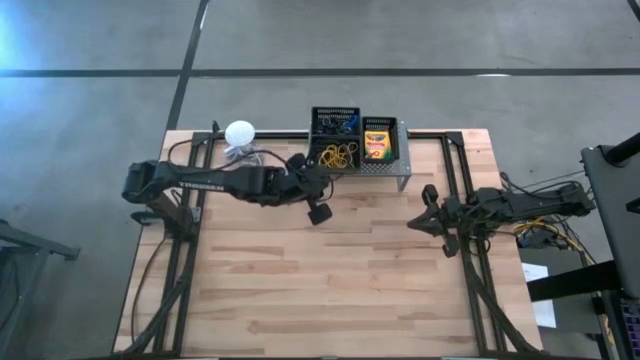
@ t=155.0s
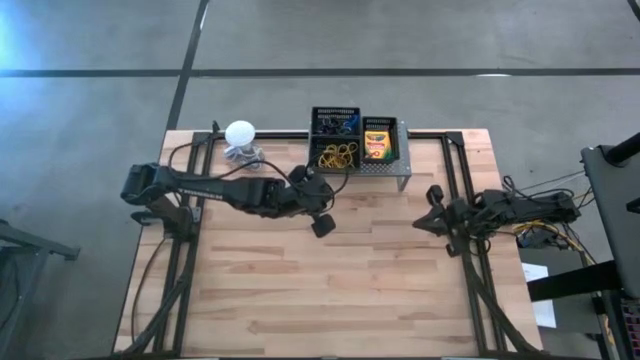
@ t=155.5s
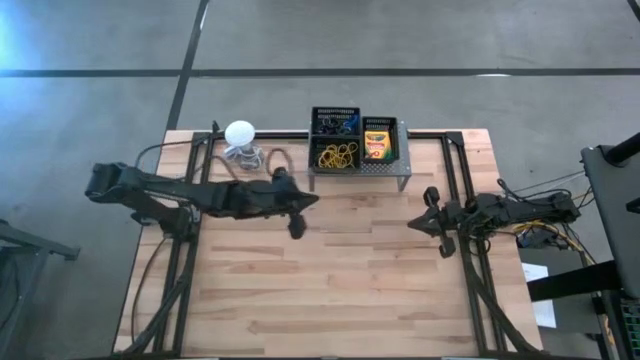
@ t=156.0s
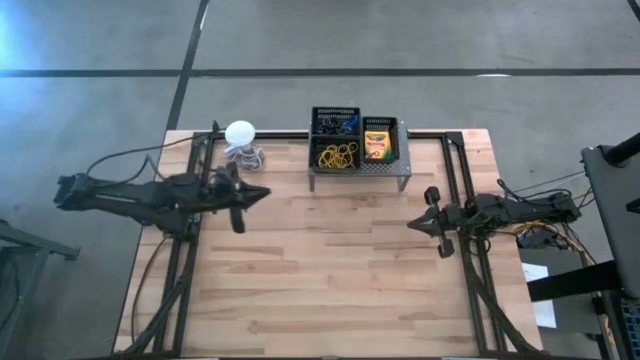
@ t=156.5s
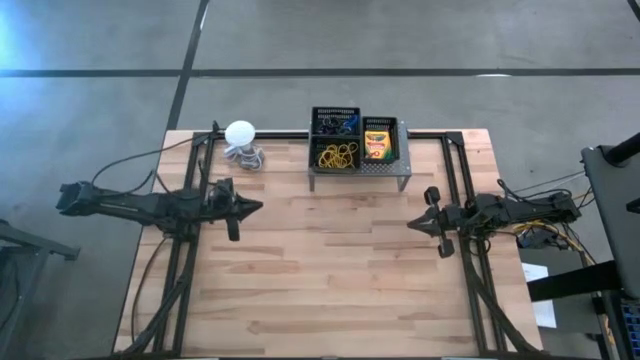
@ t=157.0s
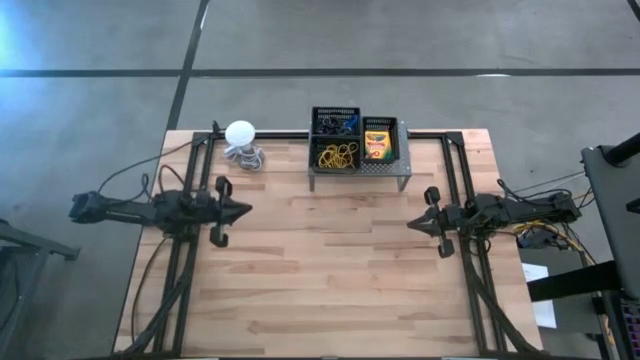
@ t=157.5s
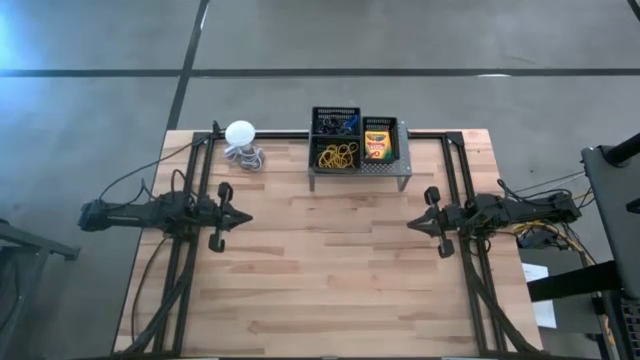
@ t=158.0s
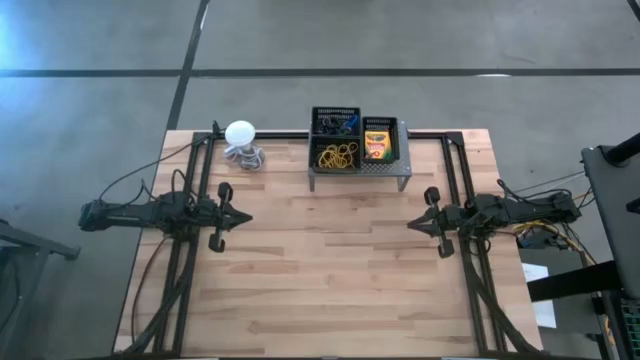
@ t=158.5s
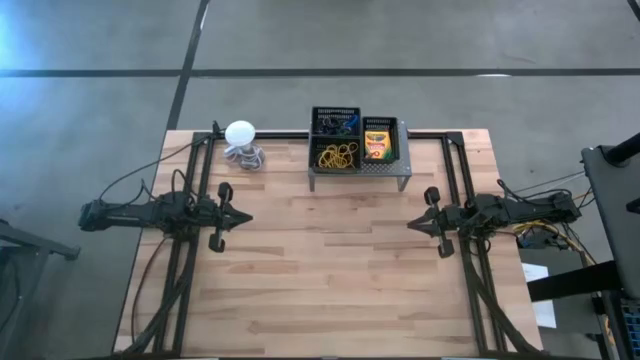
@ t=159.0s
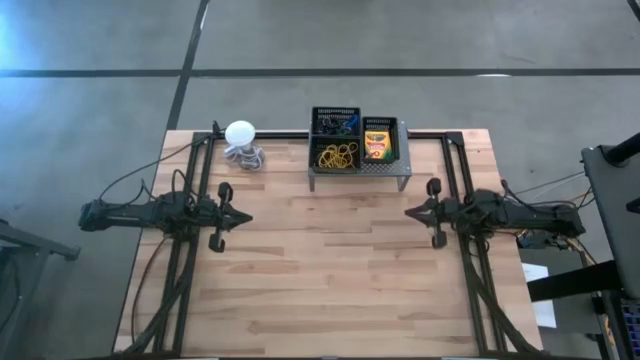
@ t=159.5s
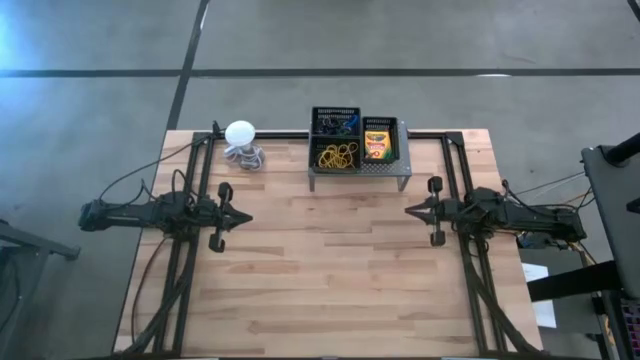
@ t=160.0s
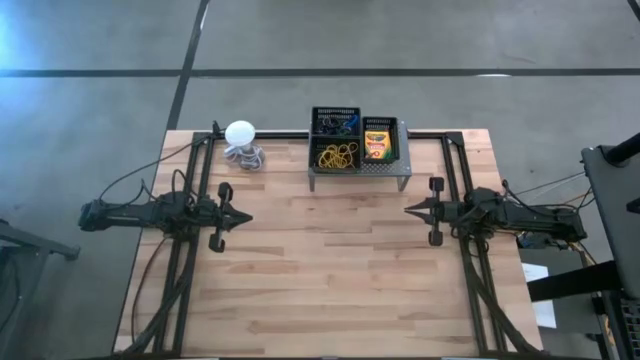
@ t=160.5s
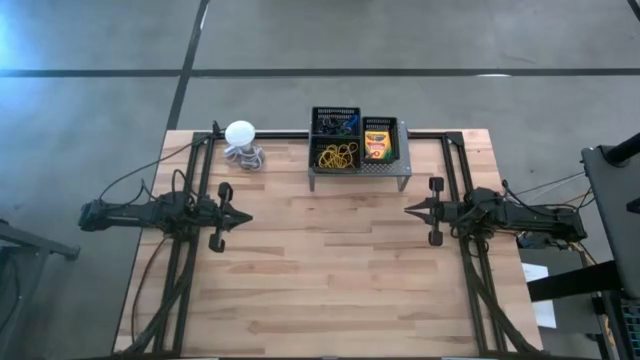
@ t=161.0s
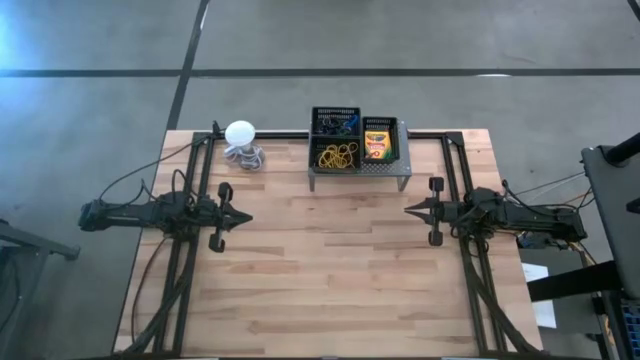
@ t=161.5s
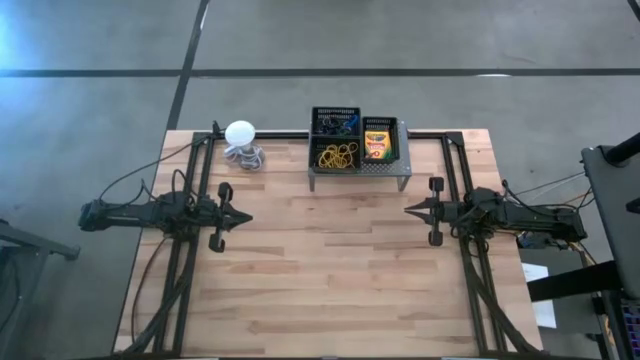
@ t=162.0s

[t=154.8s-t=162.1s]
Task: Pick & Place Office Desk Supplies
Return to Home Position

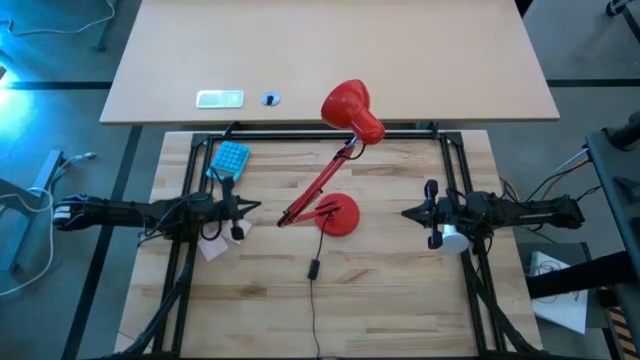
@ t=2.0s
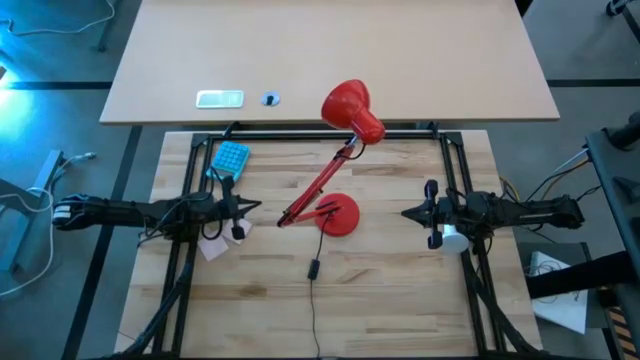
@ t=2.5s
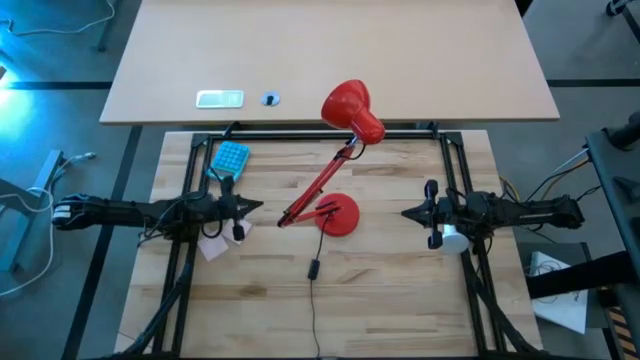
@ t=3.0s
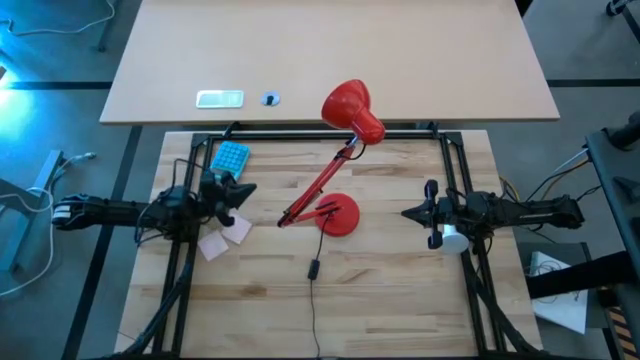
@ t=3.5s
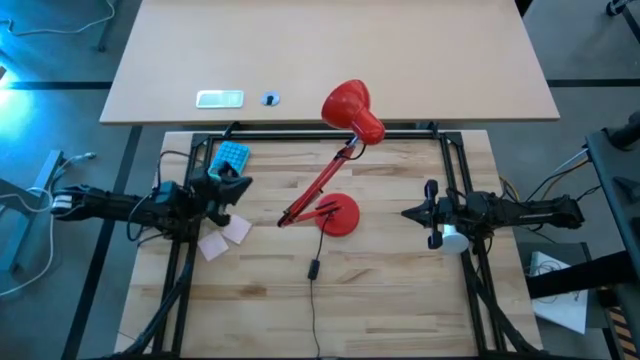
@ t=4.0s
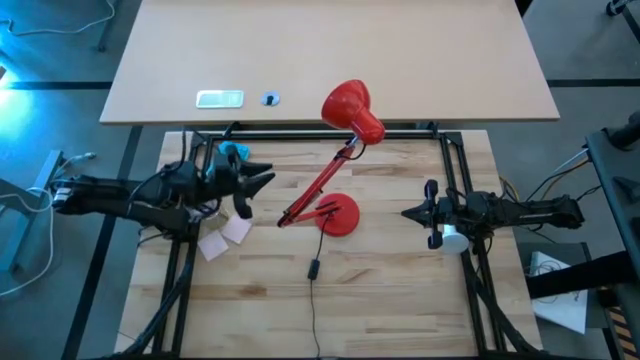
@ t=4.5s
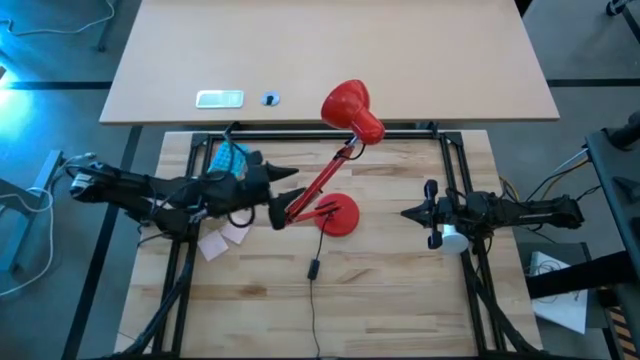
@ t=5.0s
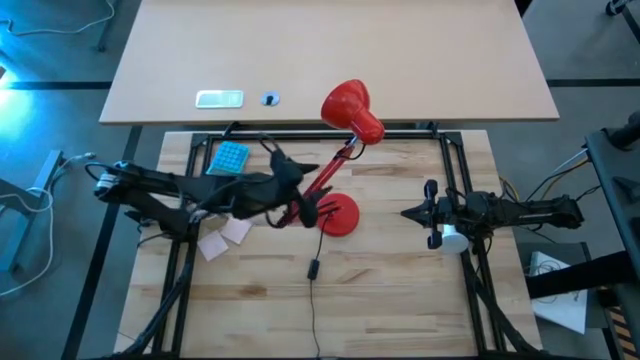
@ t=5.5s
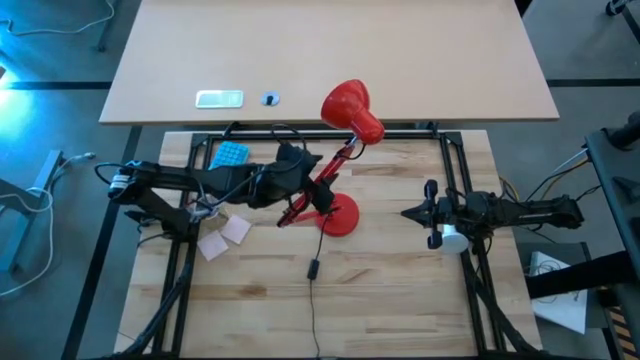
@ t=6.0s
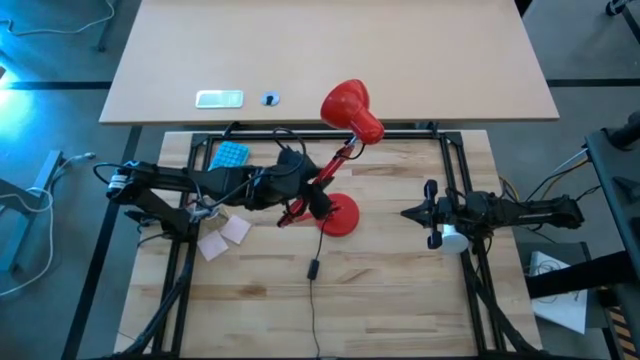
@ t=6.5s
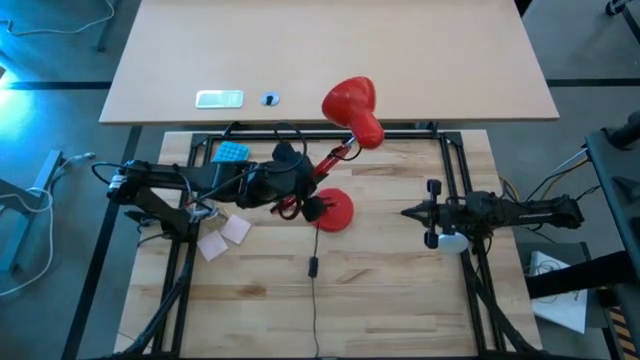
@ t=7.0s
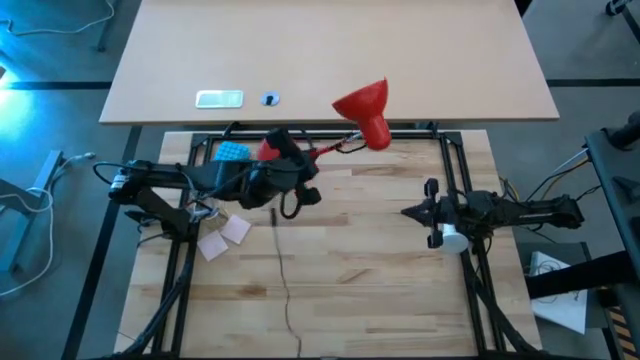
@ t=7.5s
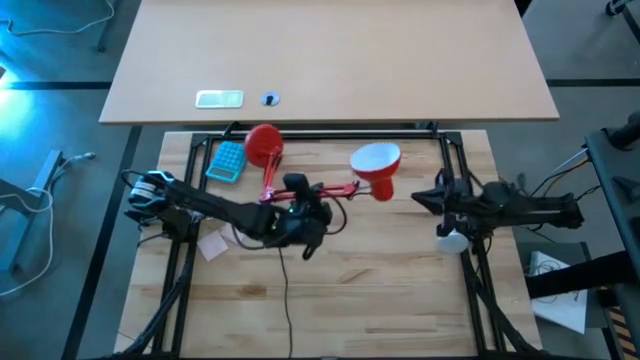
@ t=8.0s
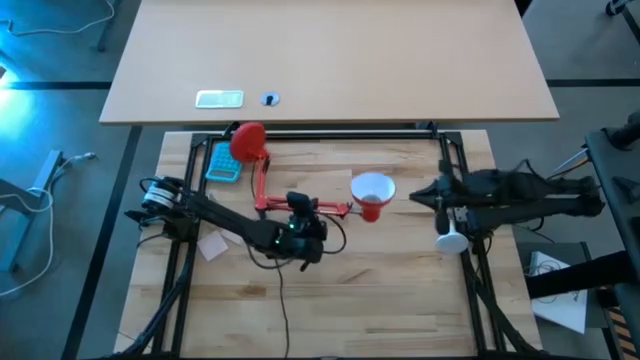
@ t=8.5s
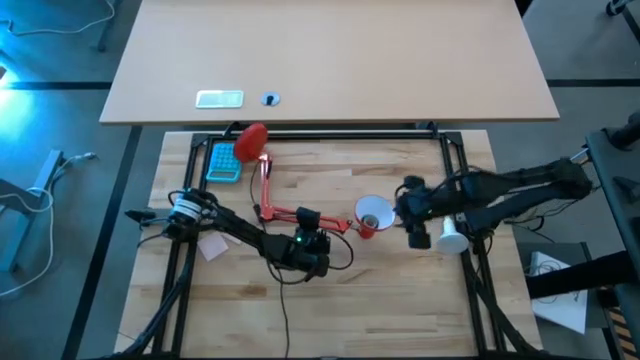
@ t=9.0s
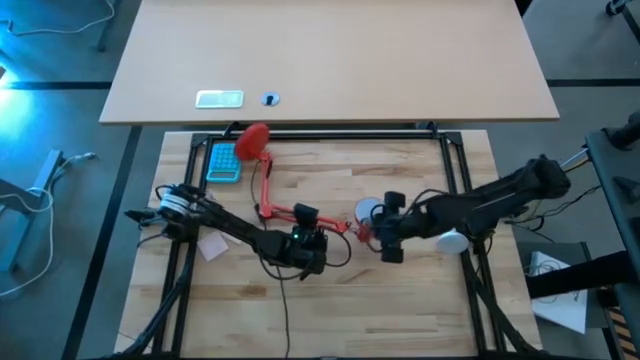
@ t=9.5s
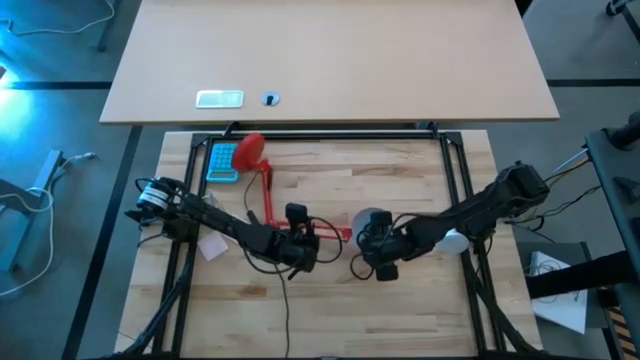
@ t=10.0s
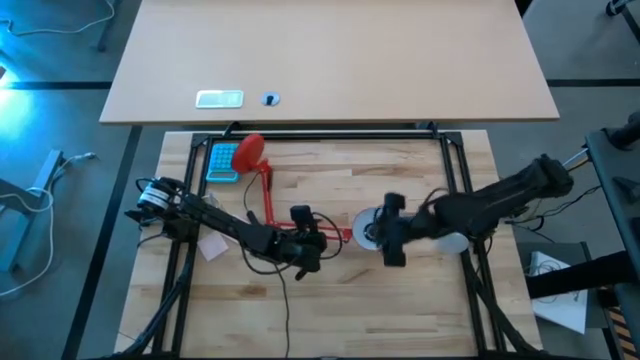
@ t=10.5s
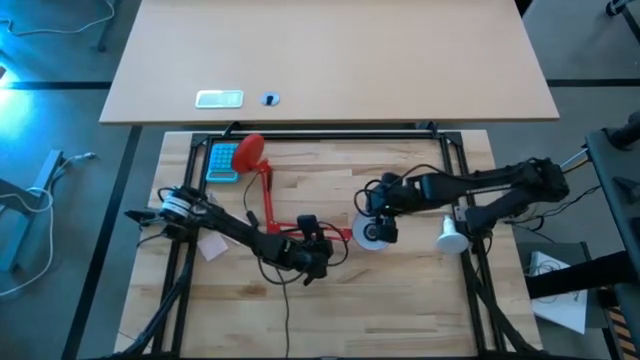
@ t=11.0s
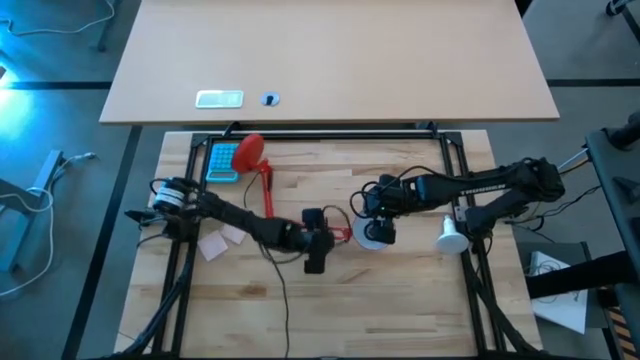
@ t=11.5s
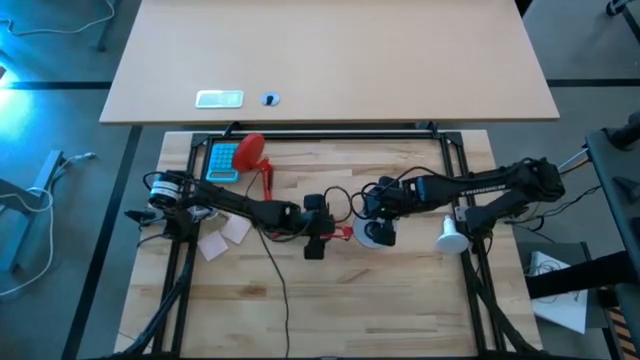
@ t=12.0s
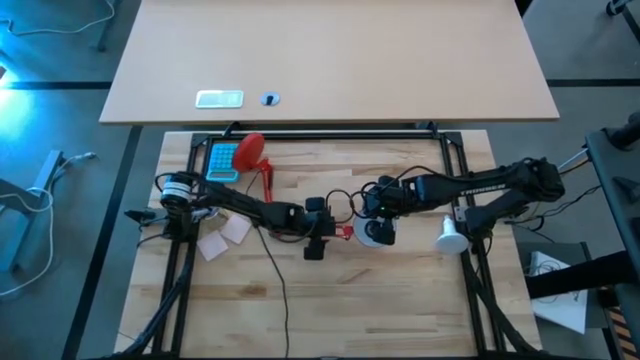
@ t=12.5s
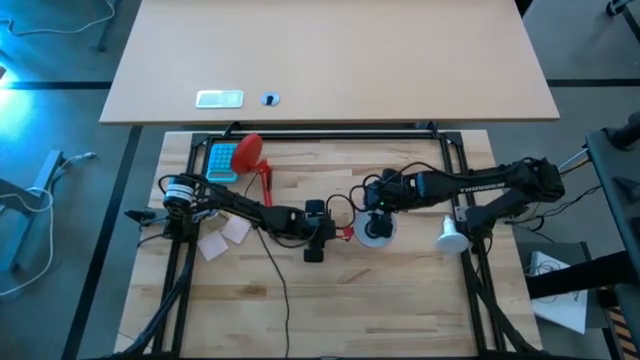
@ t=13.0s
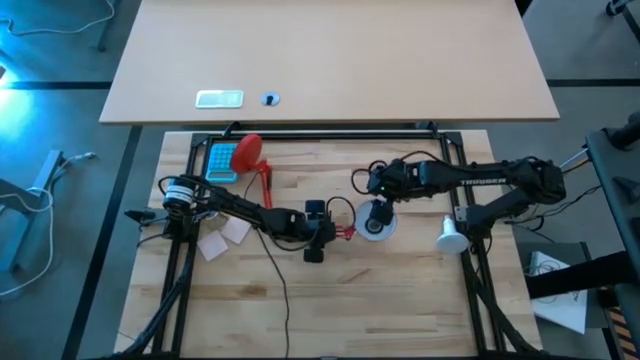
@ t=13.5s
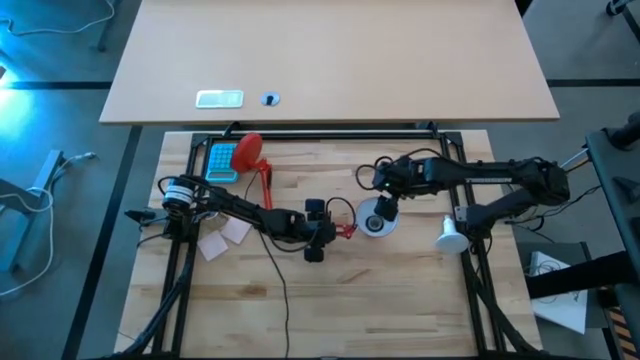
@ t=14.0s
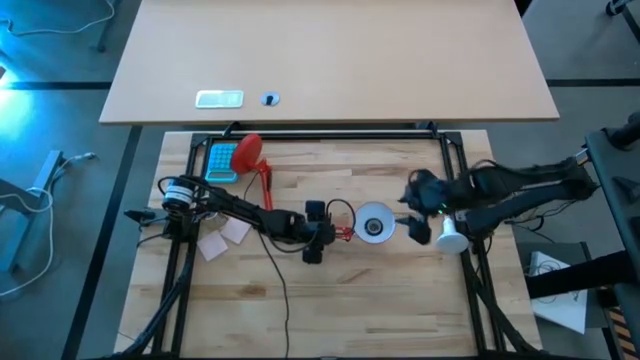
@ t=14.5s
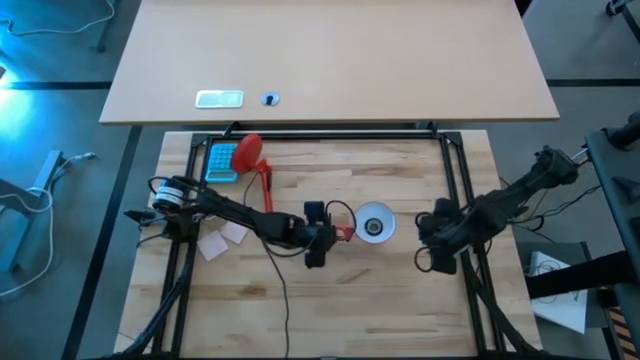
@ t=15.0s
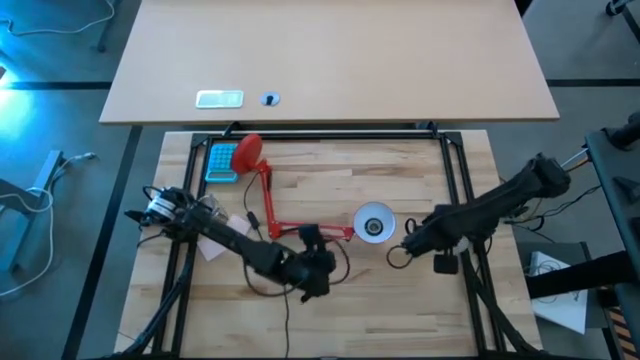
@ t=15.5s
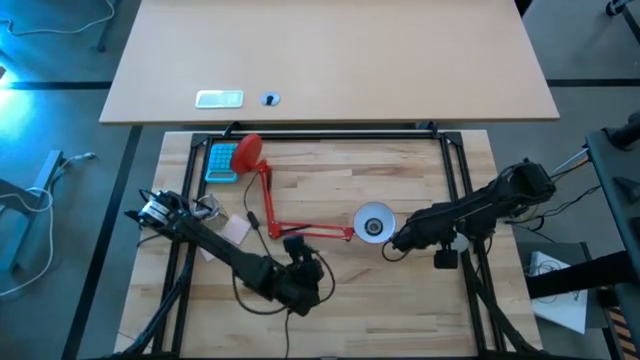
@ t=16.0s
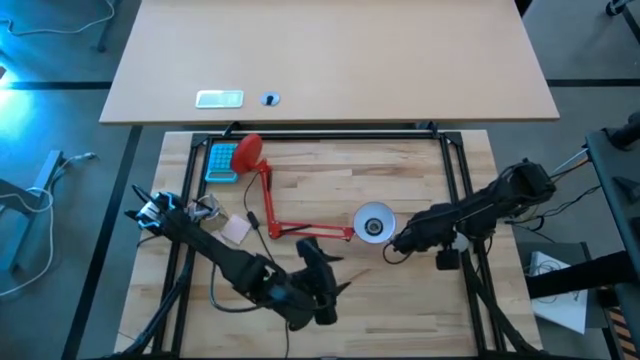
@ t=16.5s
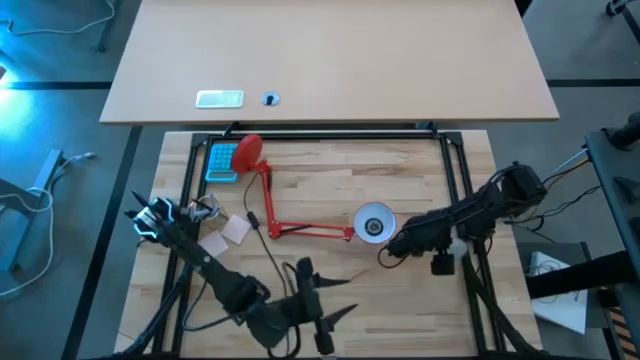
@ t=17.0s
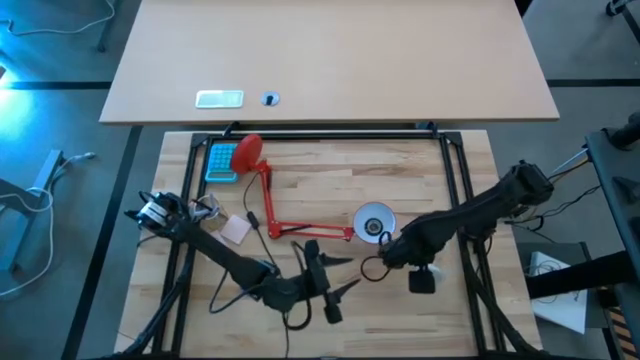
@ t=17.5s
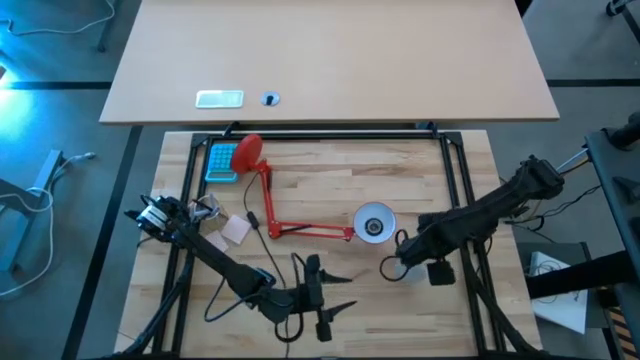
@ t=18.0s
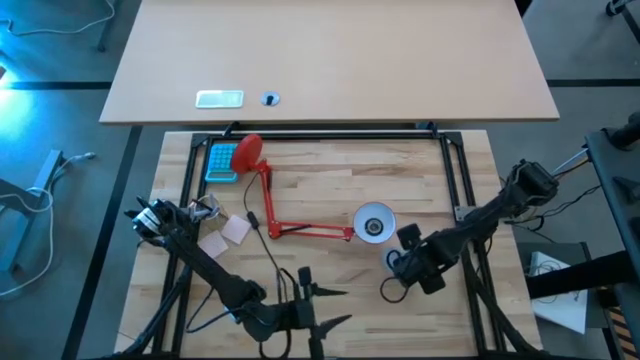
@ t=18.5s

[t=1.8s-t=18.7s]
Task: Screw lightbulb
Insert the light bulb into the lamp
